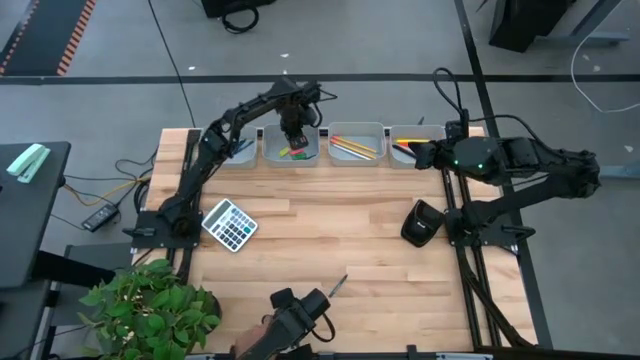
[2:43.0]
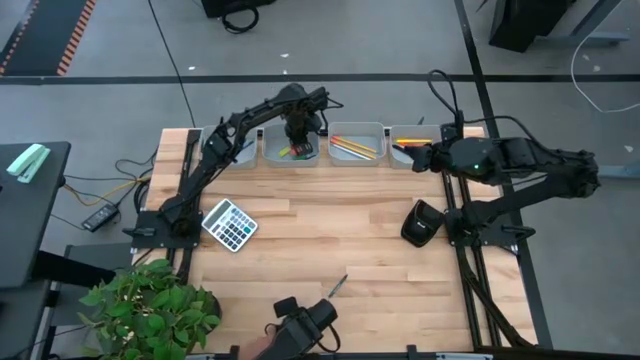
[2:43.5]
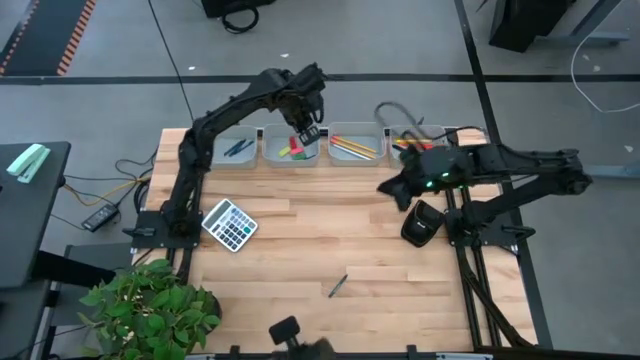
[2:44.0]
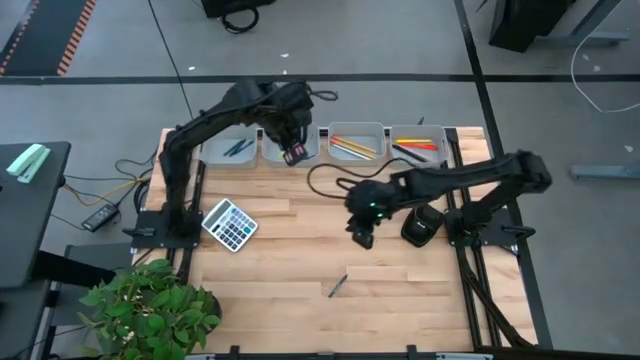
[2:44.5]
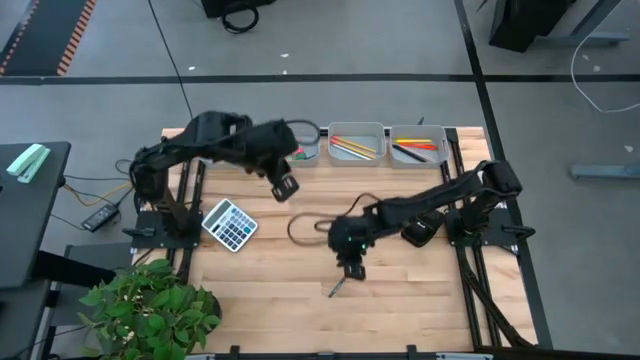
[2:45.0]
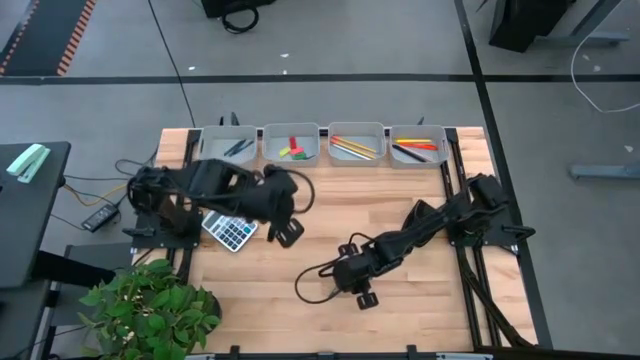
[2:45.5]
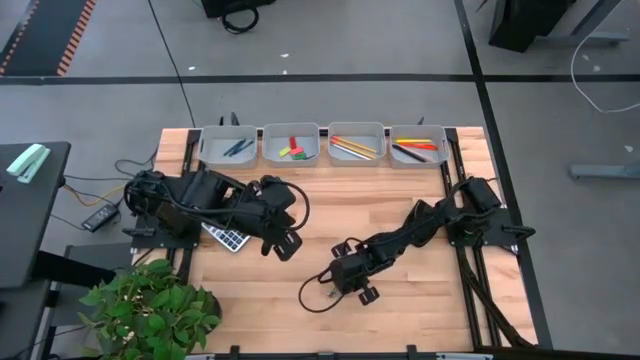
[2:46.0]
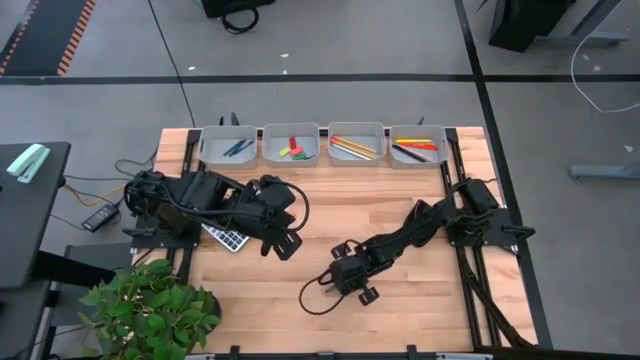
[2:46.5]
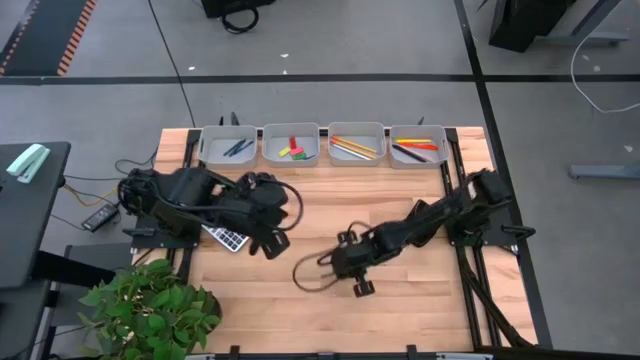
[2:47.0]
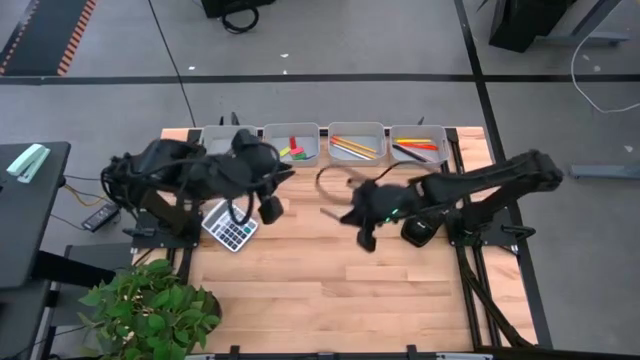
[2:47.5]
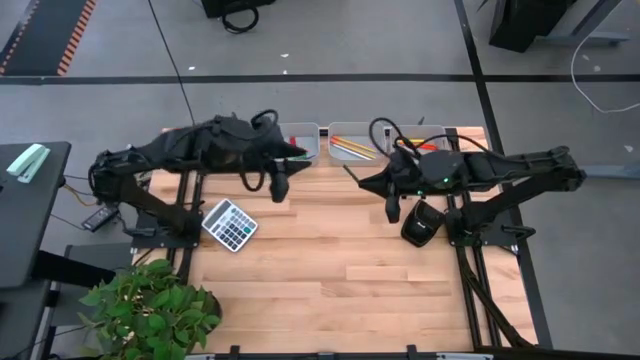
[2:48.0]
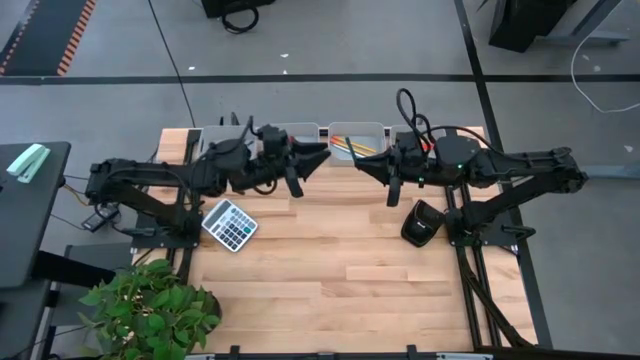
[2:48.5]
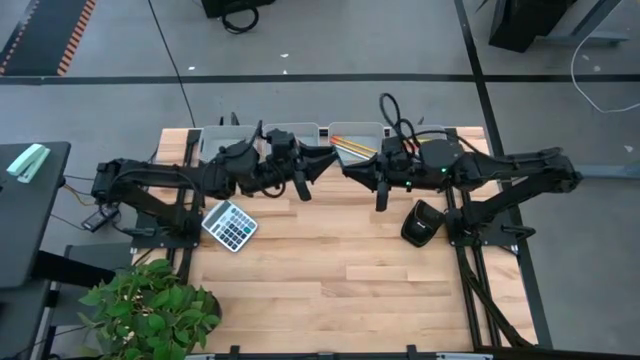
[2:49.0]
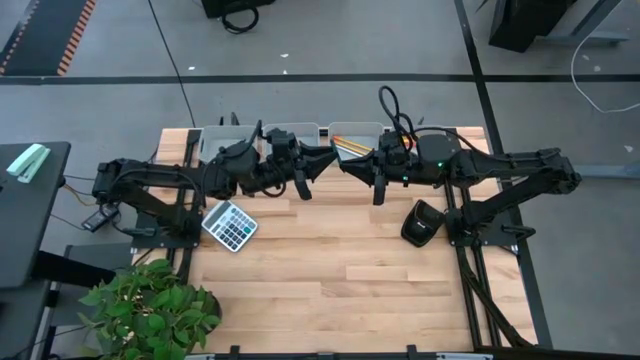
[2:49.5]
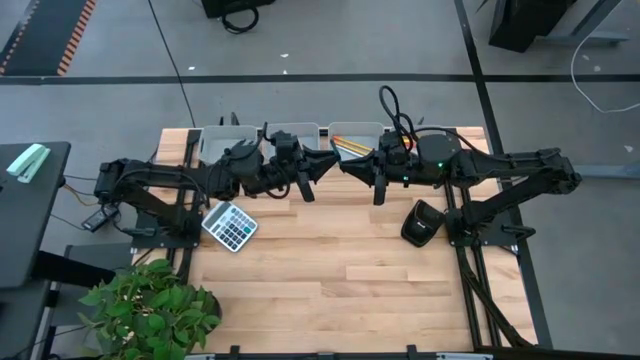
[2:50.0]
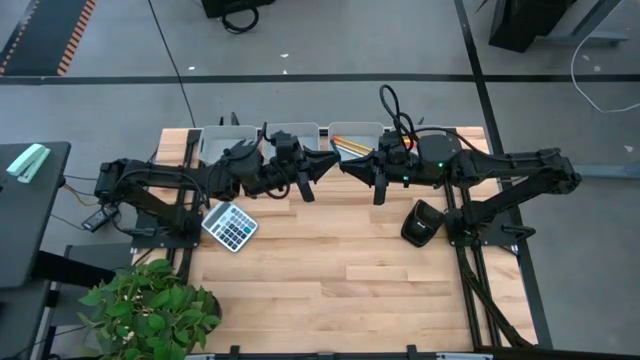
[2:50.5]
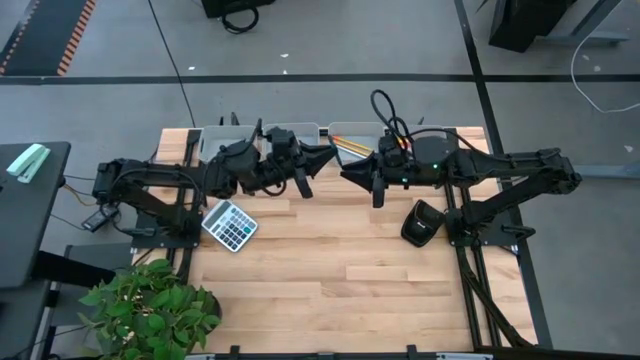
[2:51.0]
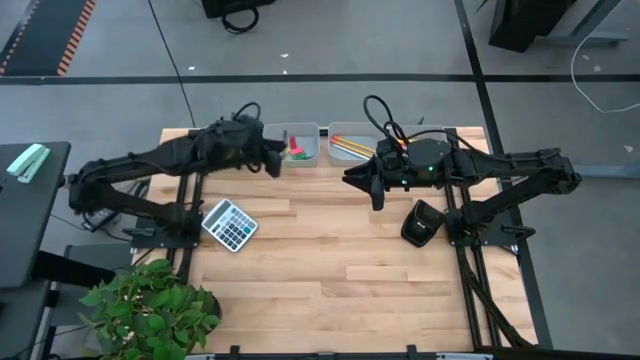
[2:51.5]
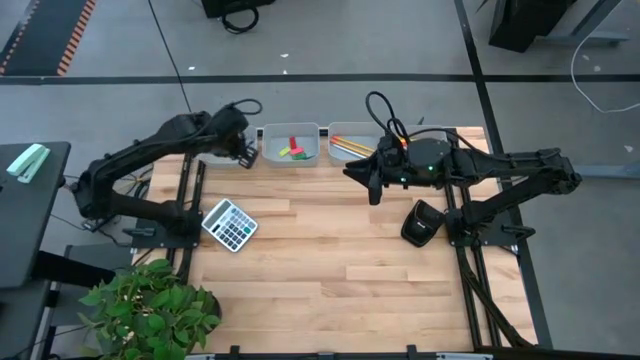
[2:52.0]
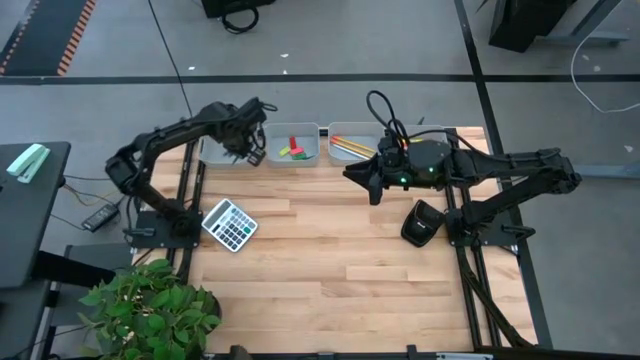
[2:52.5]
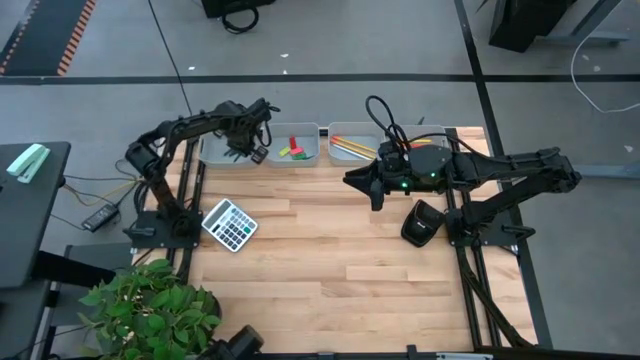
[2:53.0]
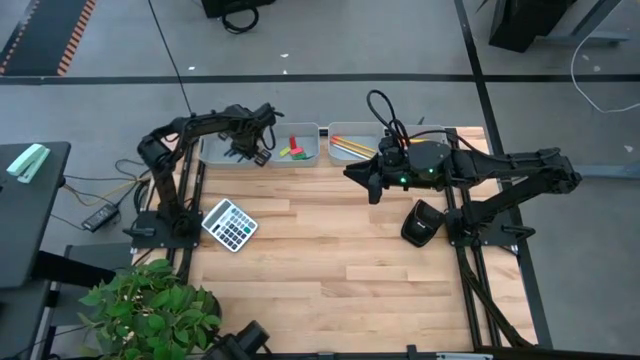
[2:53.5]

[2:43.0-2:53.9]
Task: Sort crayons/erasers/pens/pencils in bins
Put the green crayon into the gray bin

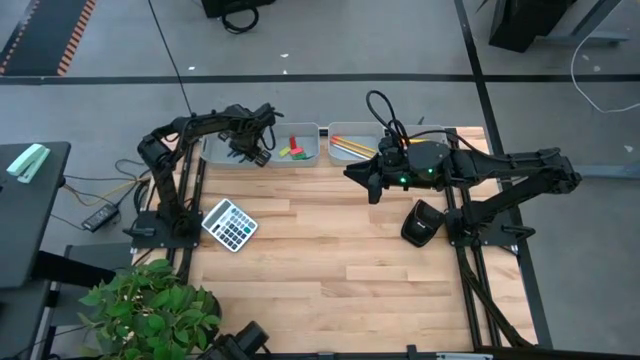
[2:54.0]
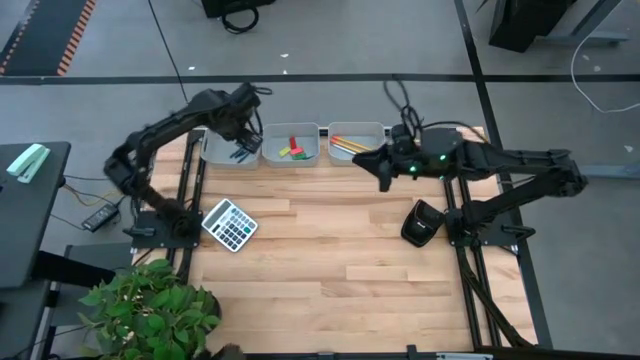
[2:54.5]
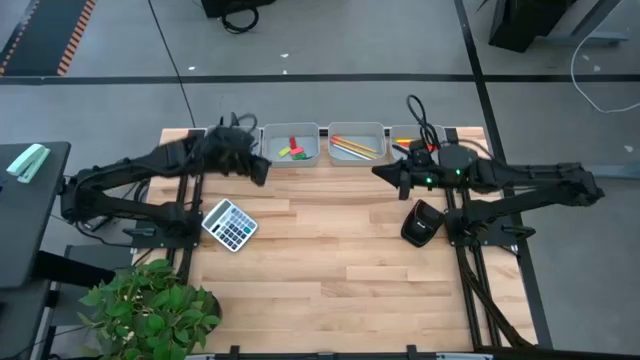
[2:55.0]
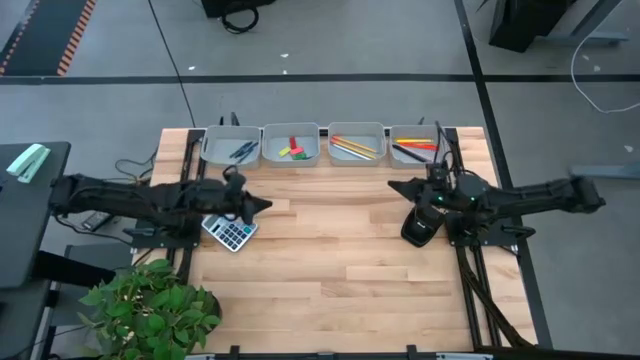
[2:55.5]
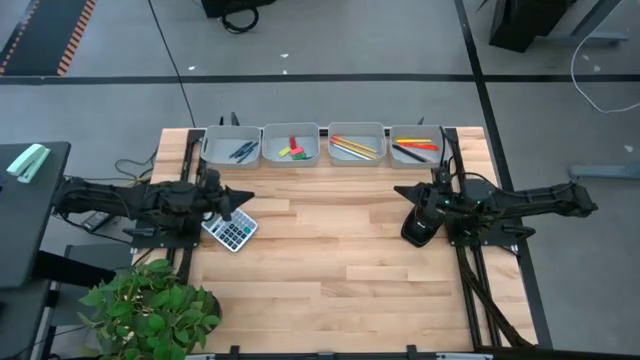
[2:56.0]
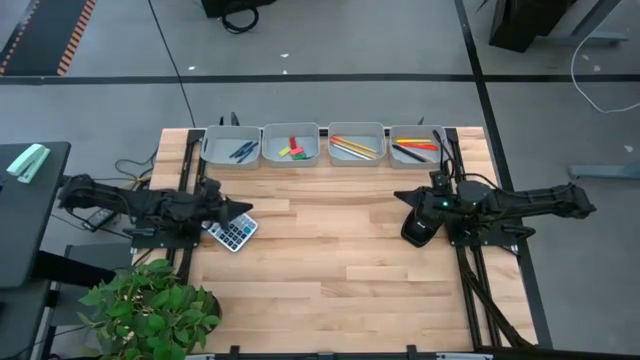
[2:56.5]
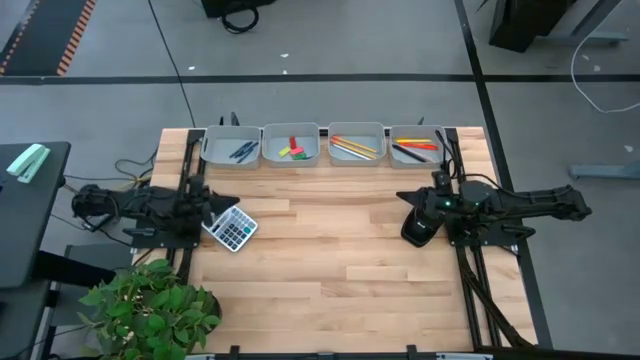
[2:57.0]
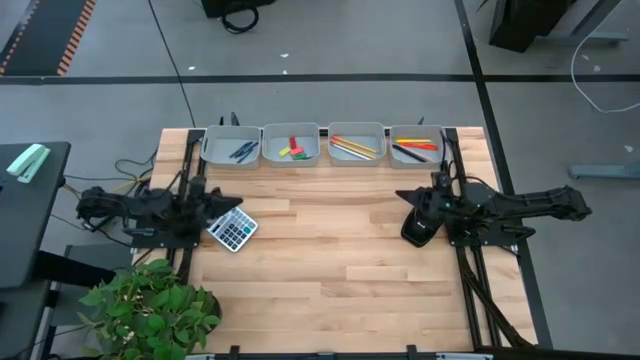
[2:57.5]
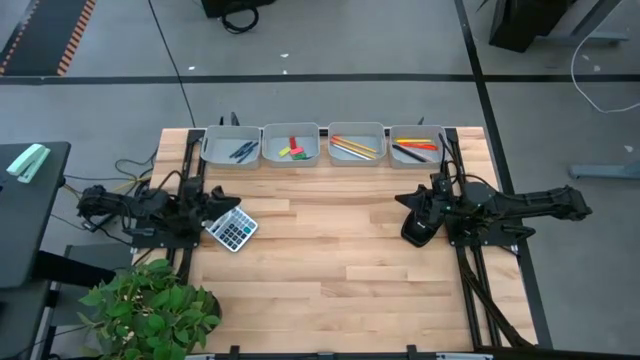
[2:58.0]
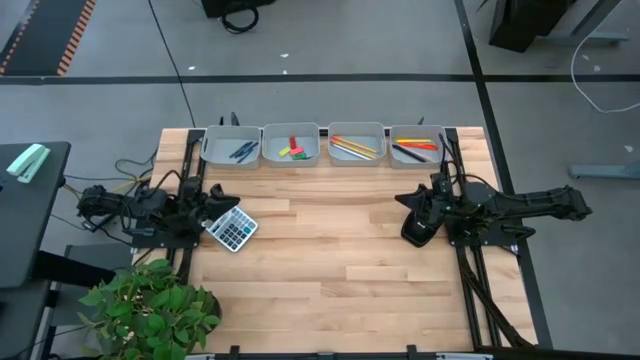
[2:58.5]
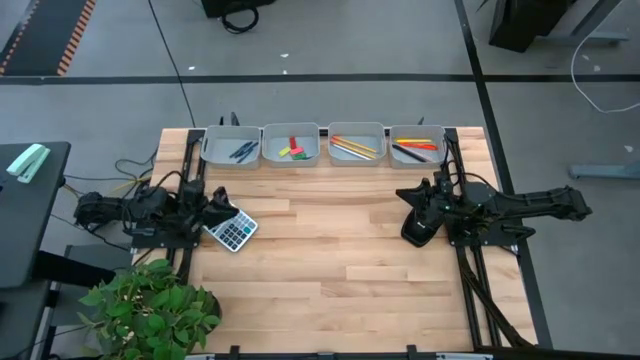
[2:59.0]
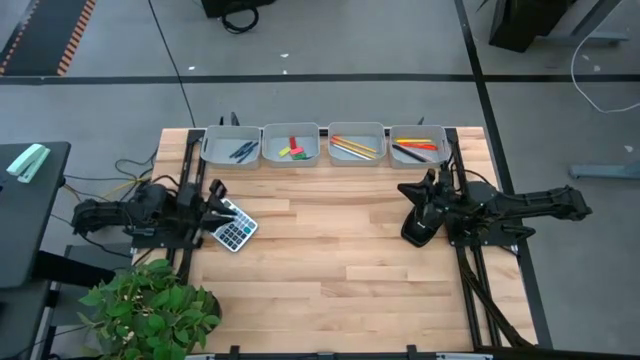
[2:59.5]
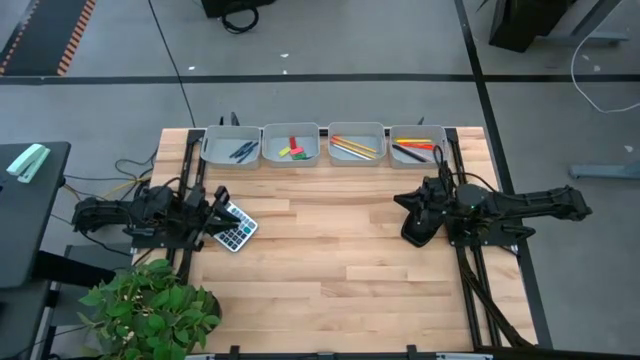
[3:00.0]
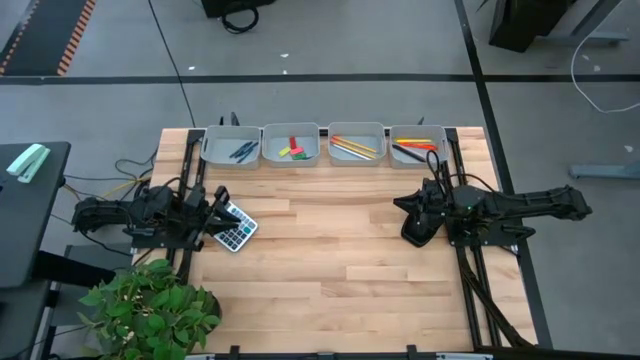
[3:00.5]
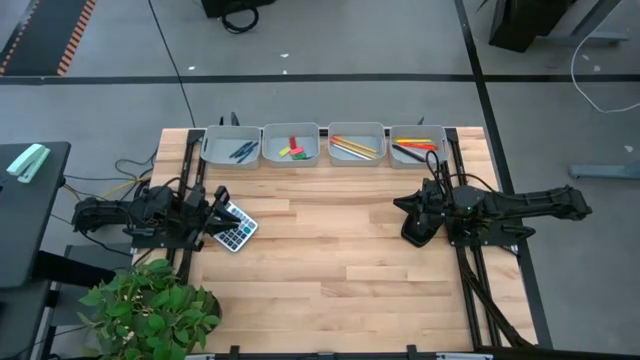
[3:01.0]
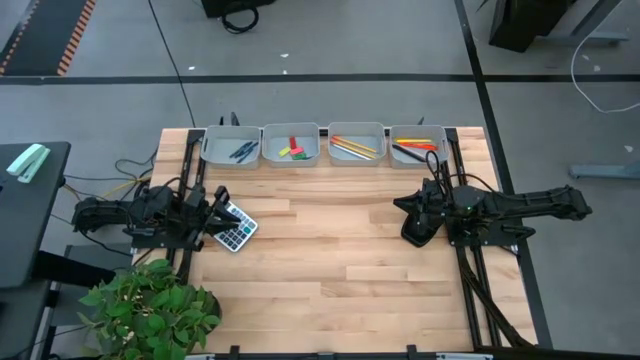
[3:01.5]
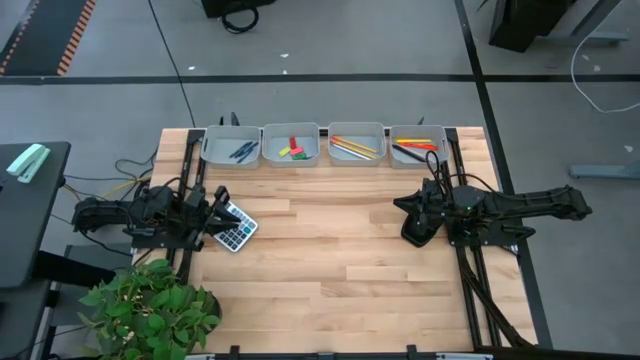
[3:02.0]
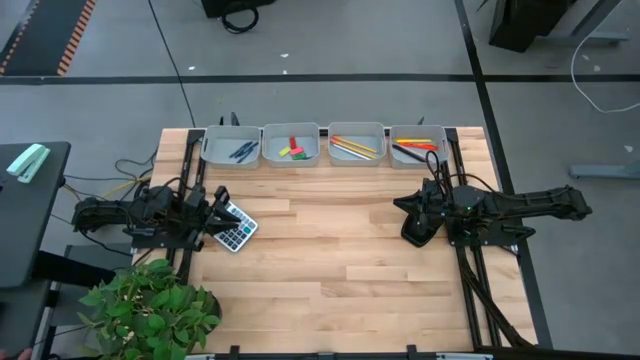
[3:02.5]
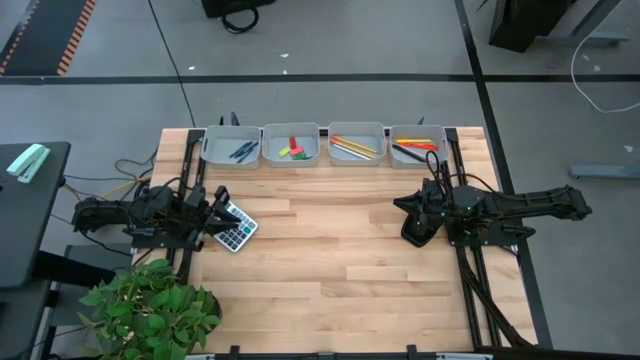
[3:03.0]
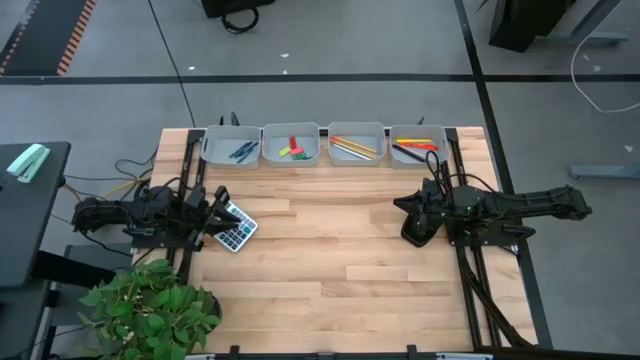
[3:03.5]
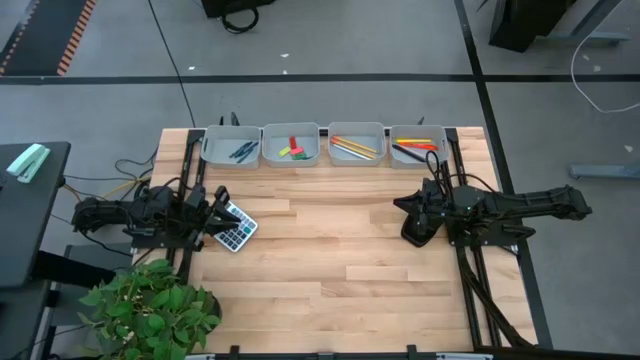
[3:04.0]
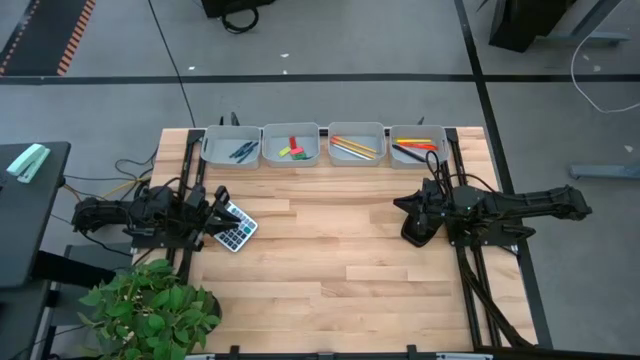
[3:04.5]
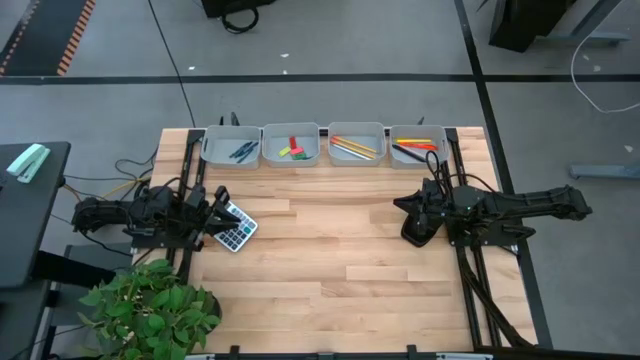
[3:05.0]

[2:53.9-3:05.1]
Return to Home Position
